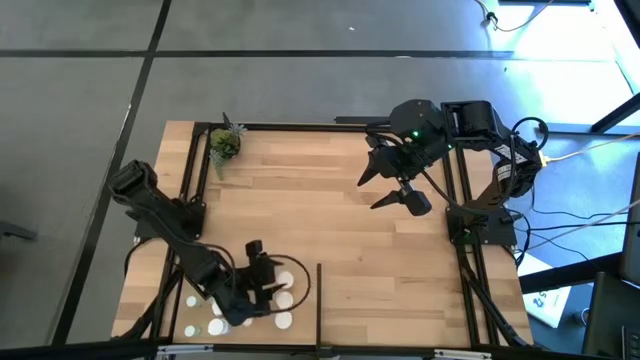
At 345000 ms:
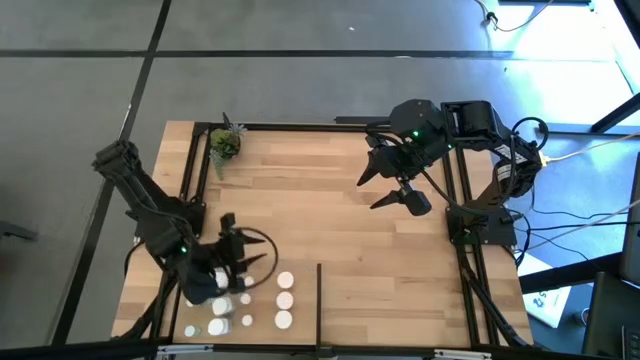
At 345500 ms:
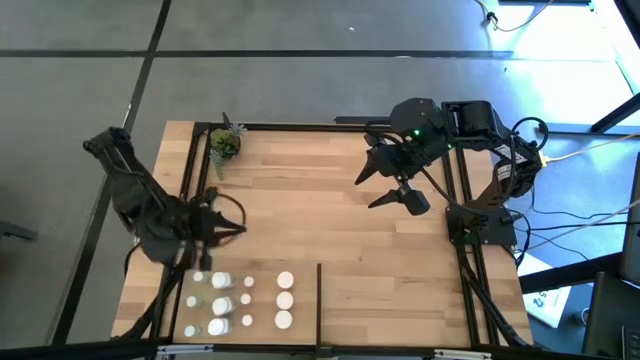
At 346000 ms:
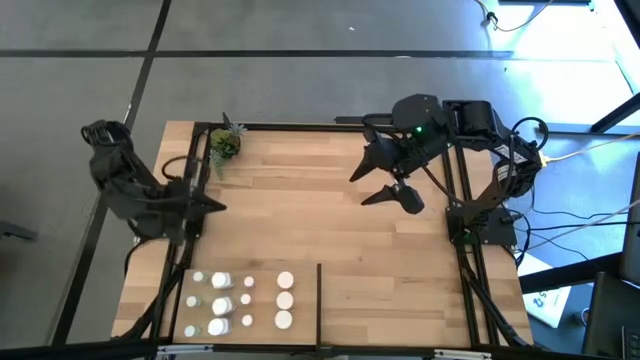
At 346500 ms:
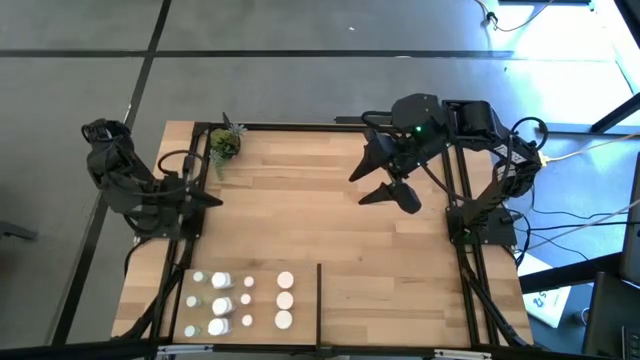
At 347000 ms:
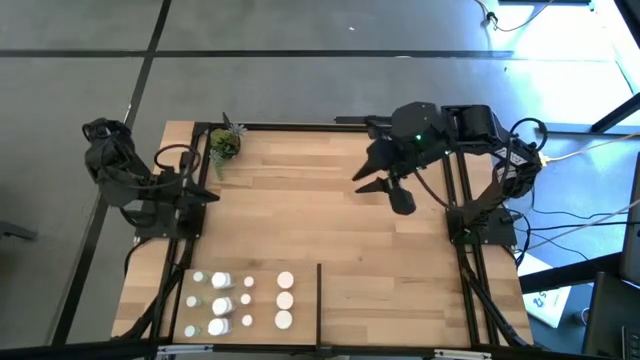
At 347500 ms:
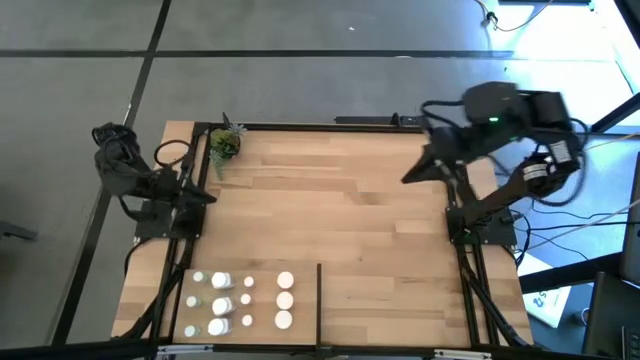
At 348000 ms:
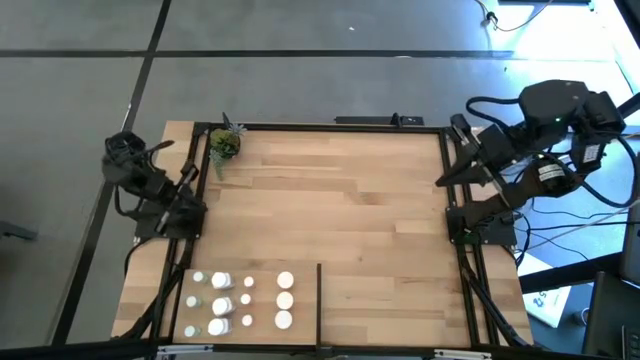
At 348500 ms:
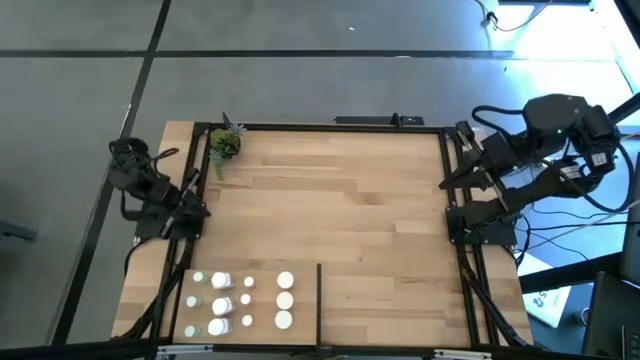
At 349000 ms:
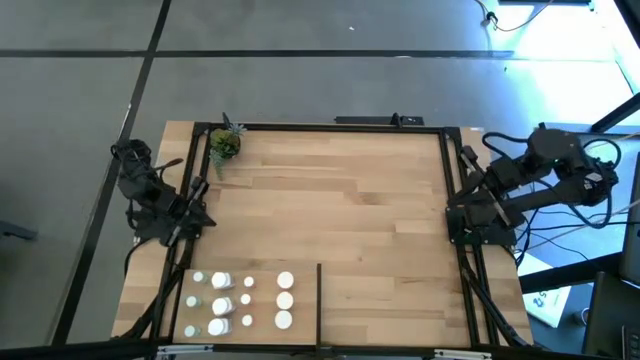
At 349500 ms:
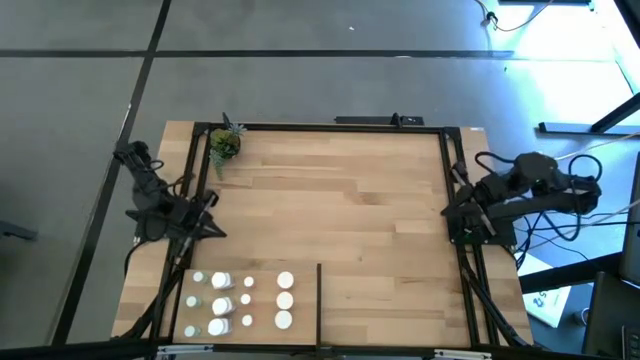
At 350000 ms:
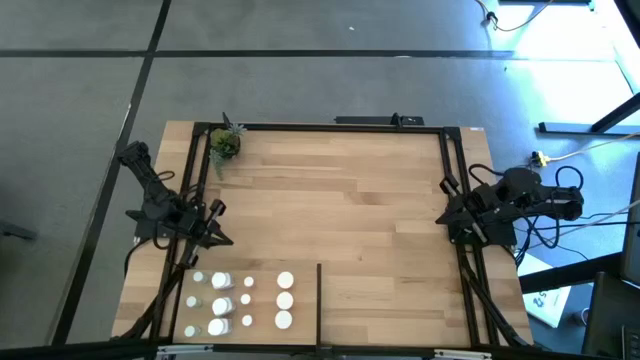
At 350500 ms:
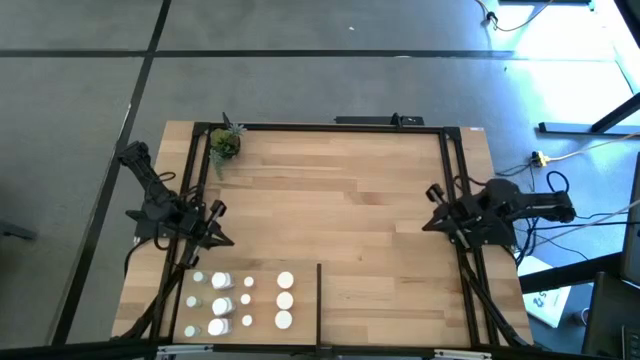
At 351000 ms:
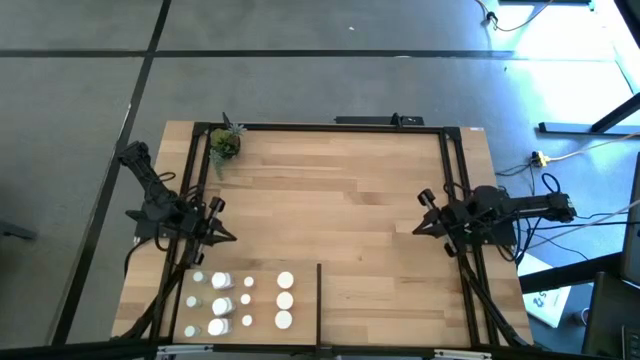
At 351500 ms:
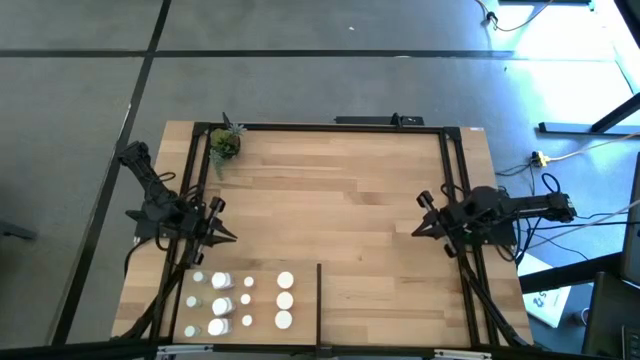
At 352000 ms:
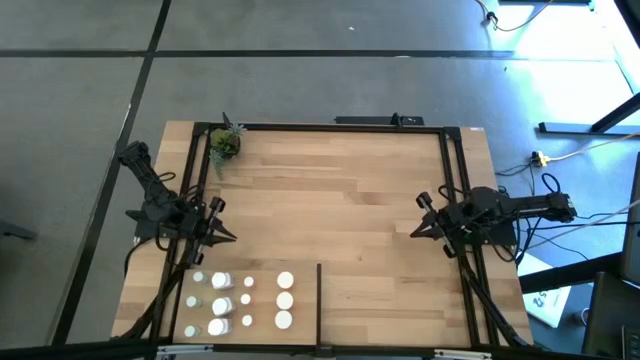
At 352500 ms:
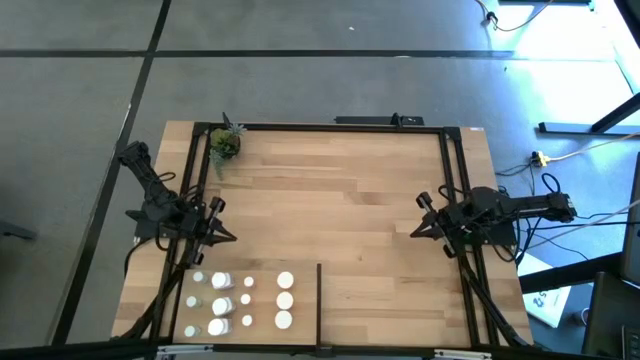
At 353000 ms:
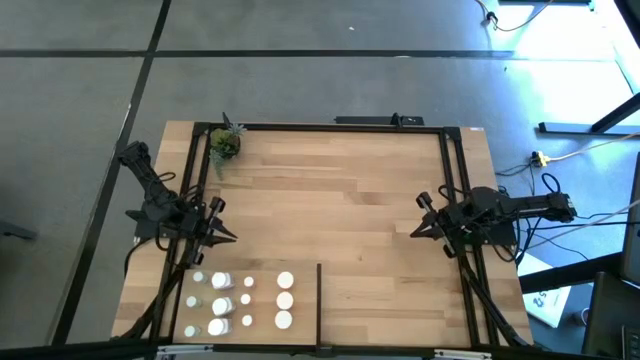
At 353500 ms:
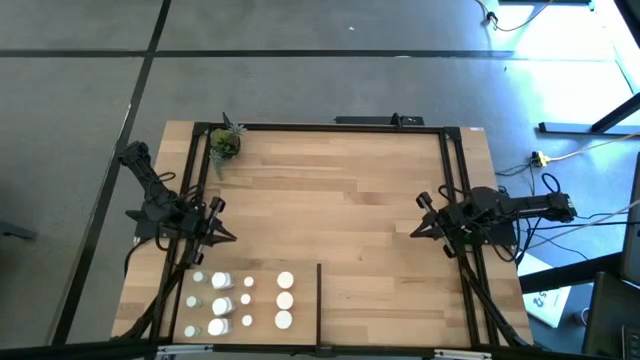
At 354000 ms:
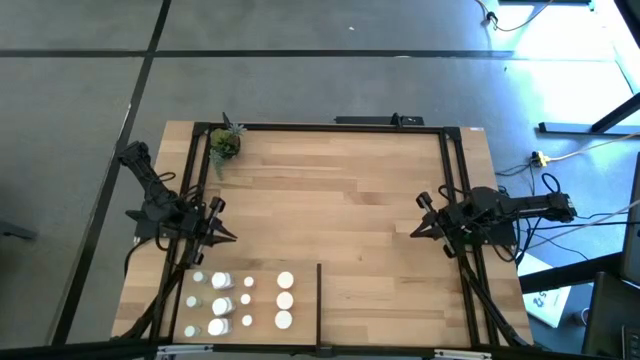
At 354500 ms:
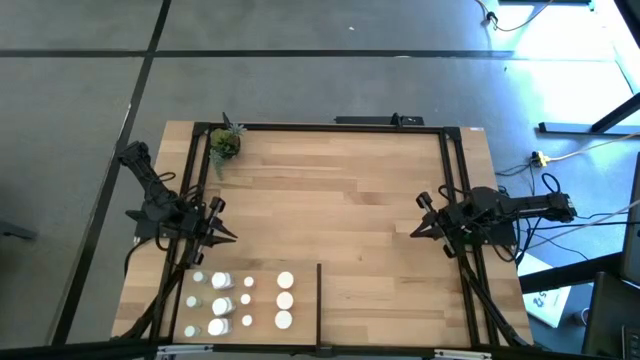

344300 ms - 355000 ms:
Task: Pick and place medicine bottles onto shelf by color
Return to Home Position

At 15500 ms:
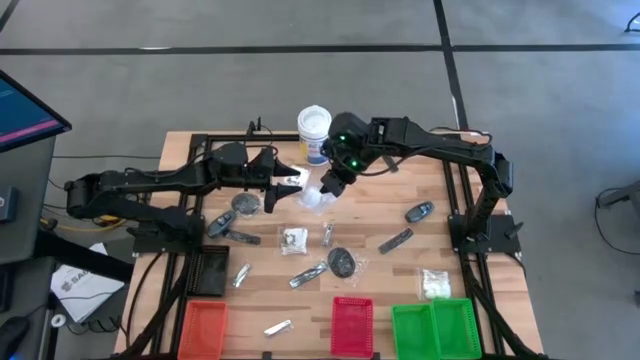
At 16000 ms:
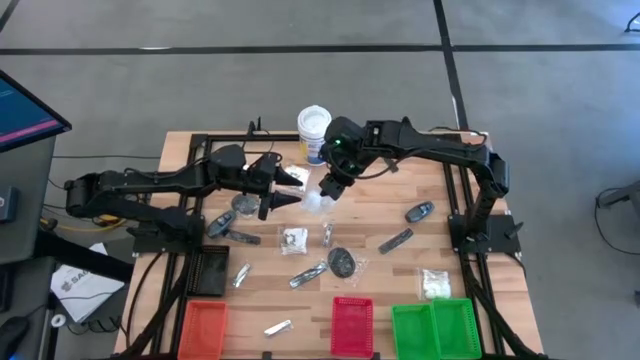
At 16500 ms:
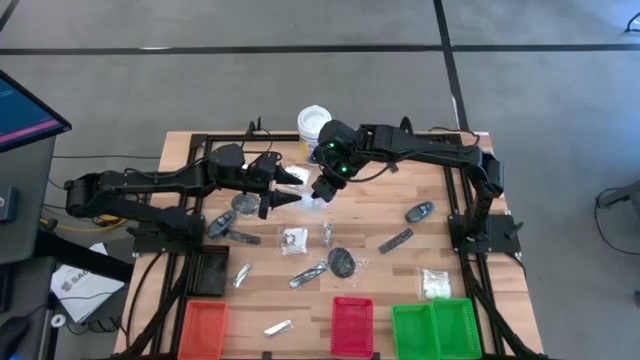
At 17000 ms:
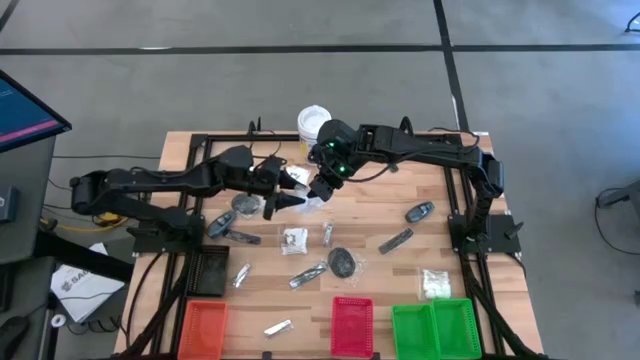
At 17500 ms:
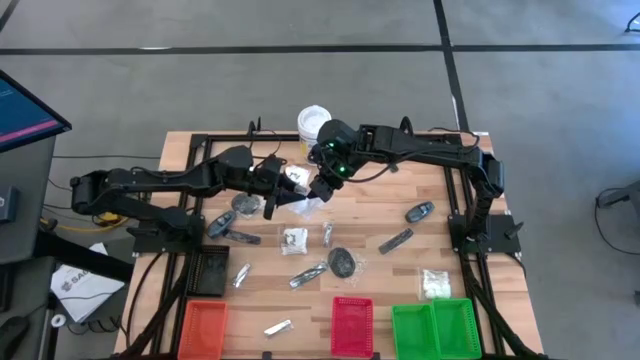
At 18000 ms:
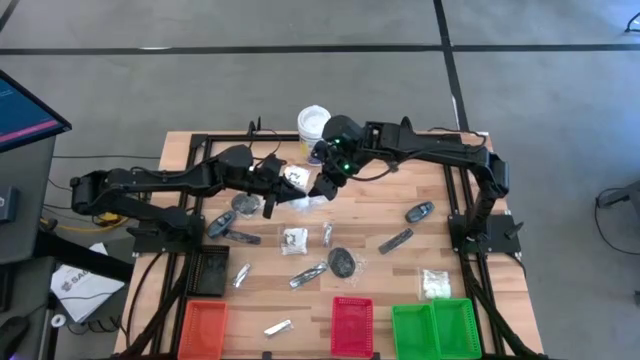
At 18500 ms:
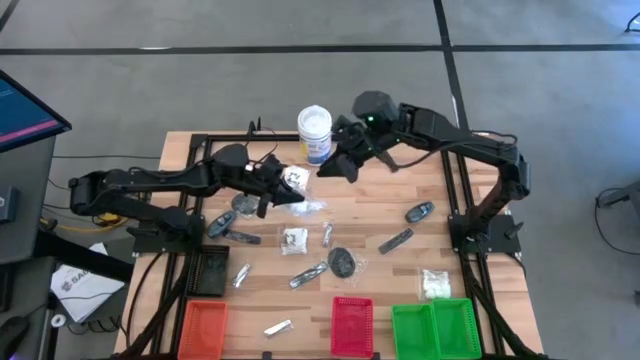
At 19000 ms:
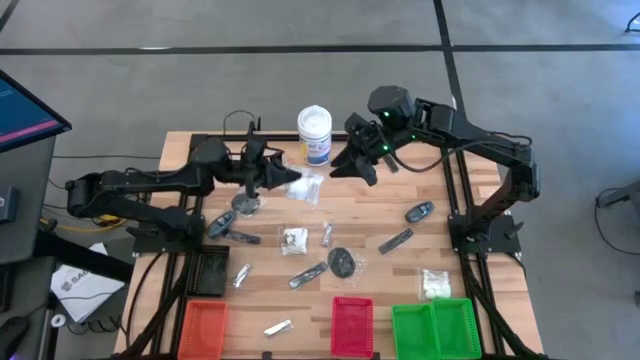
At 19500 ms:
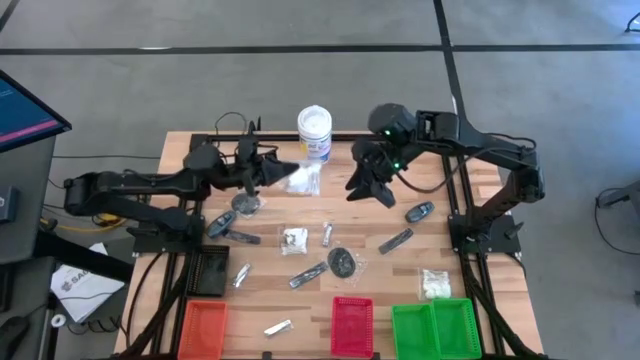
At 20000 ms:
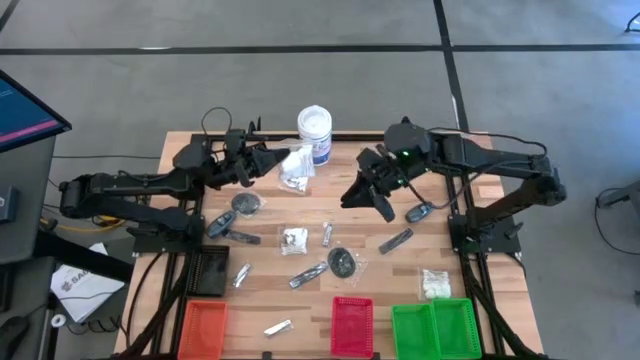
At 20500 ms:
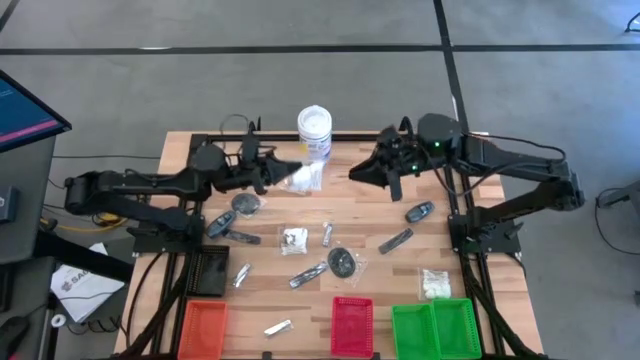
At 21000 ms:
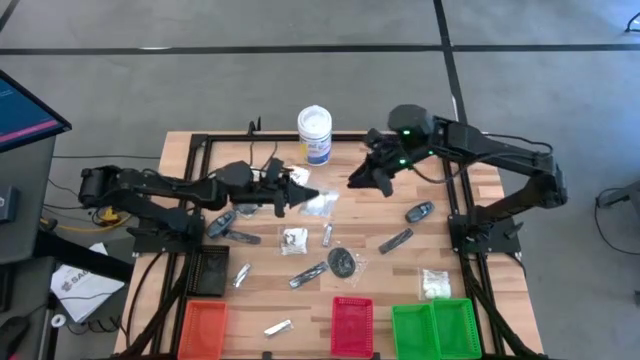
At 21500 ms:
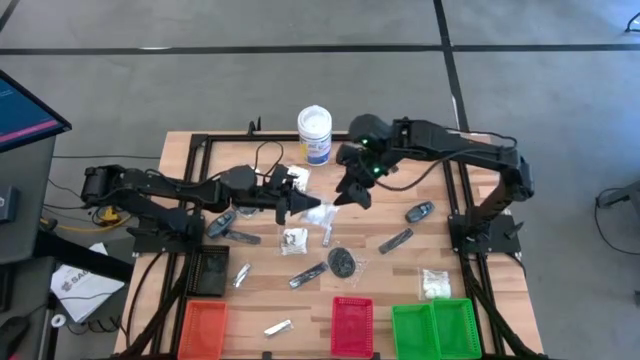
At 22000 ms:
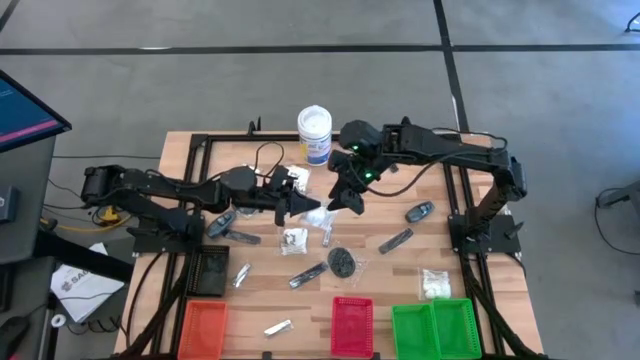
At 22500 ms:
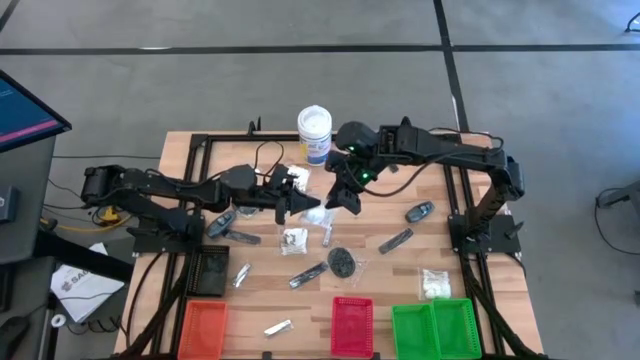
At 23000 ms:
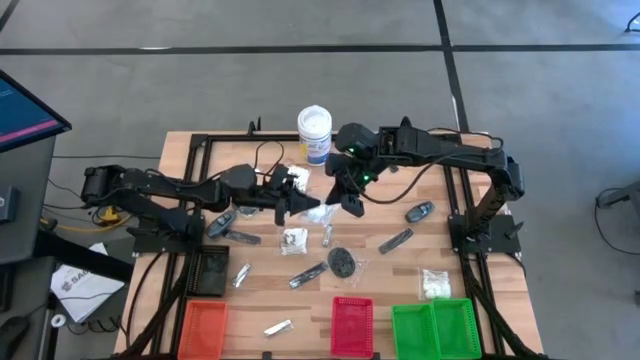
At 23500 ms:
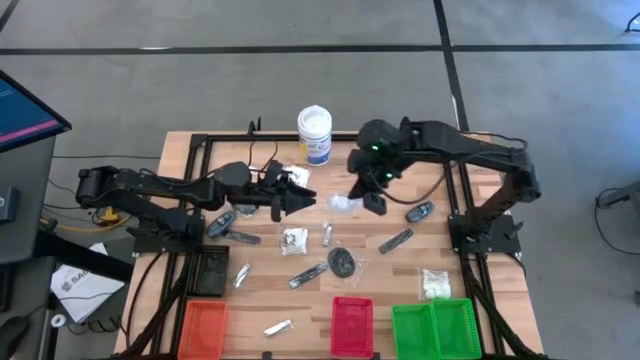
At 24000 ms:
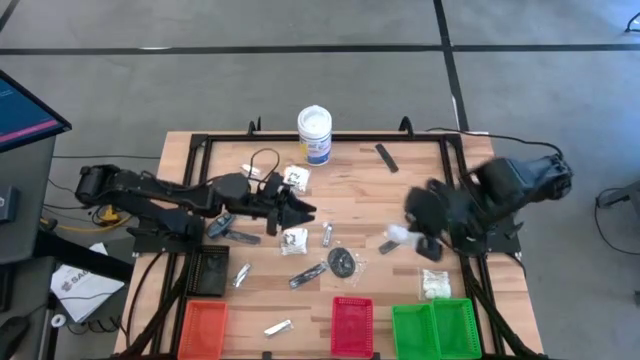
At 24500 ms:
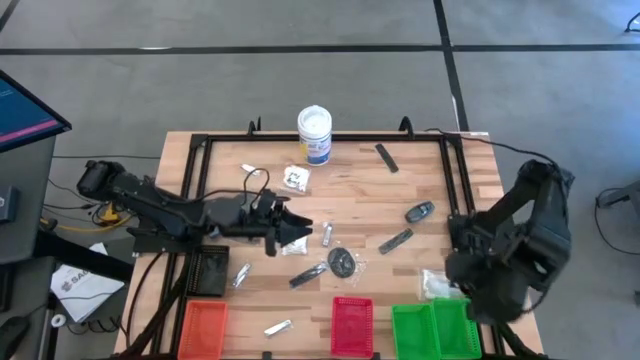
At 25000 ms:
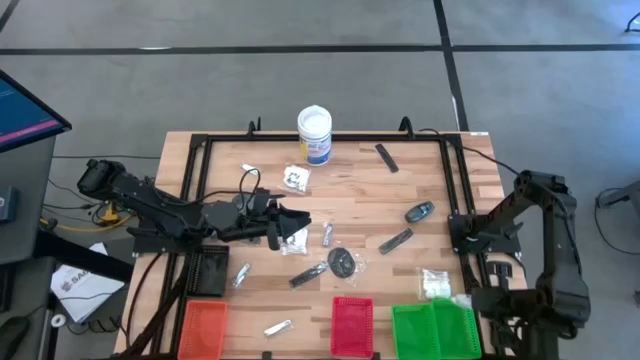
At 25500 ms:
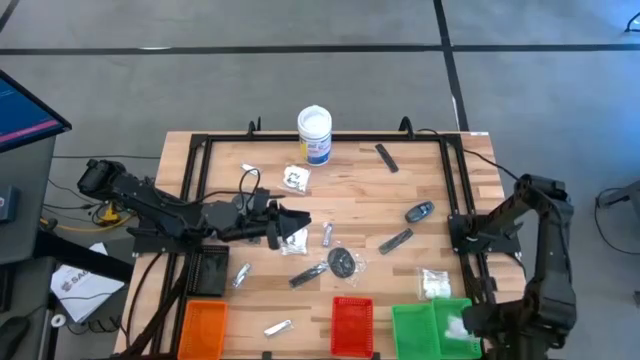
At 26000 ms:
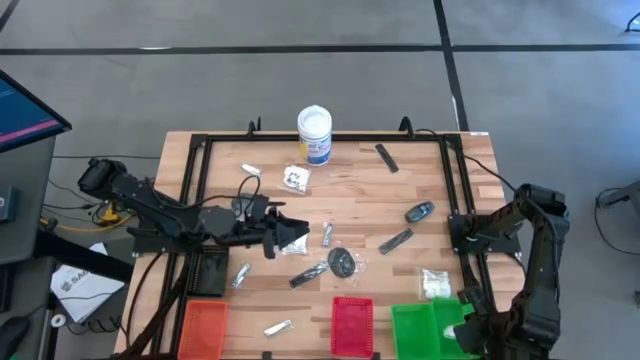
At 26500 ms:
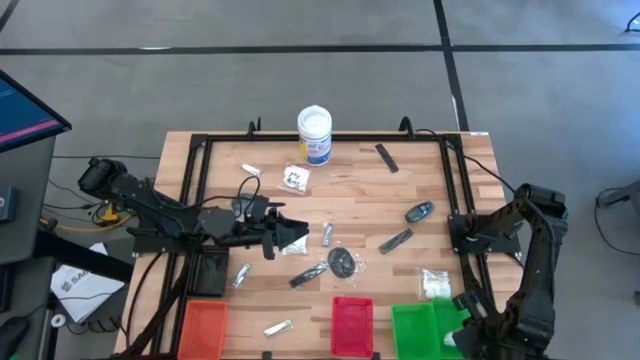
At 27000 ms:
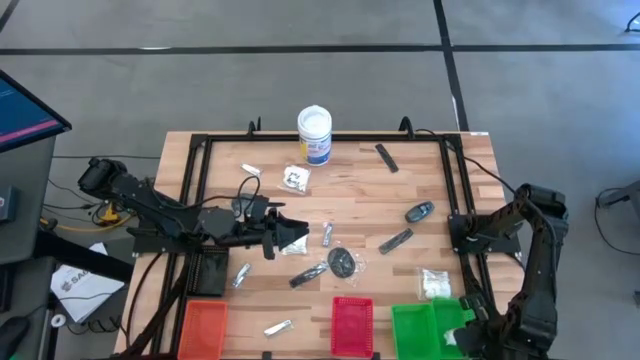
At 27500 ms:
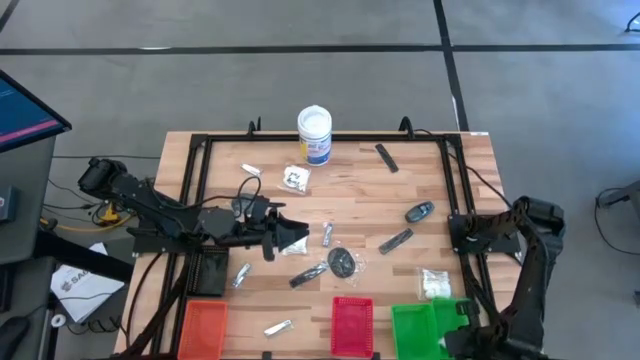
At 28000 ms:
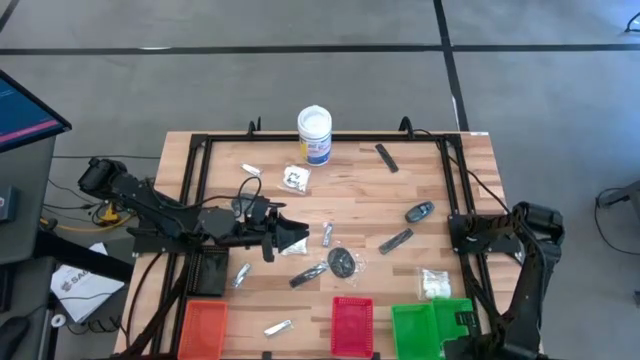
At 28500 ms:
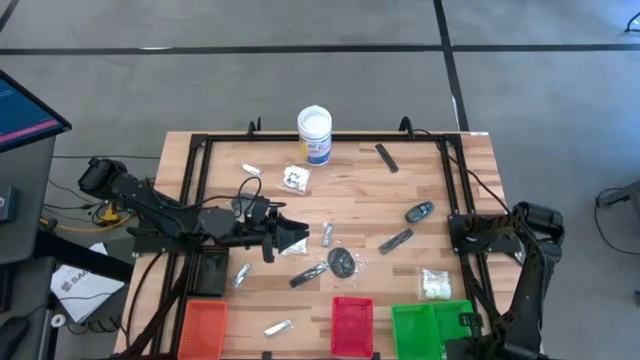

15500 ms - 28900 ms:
Task: Pick & Place Travel size toiletries
Put the white cotton pack into the right green bin
